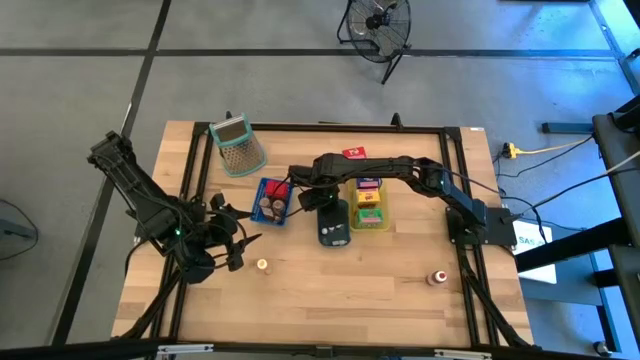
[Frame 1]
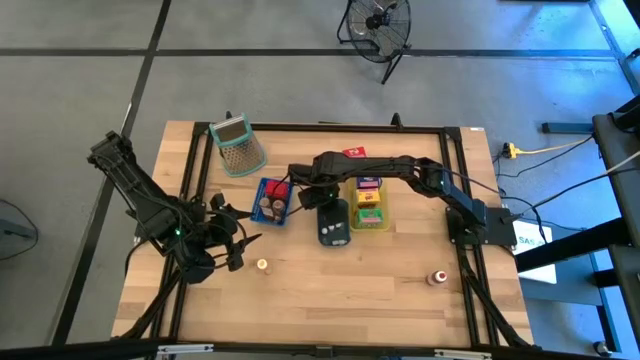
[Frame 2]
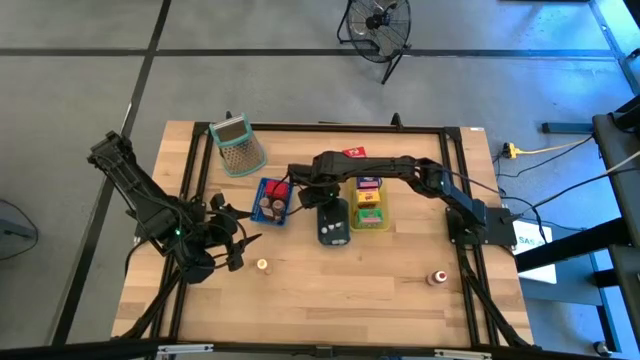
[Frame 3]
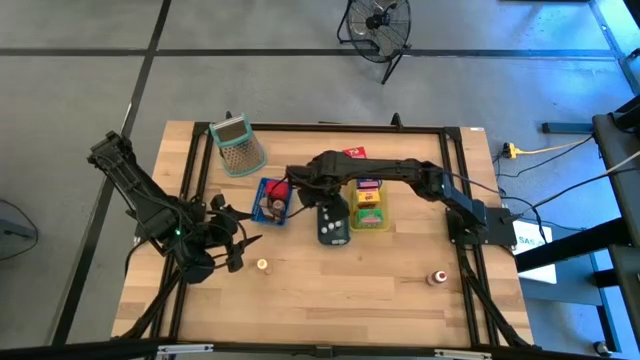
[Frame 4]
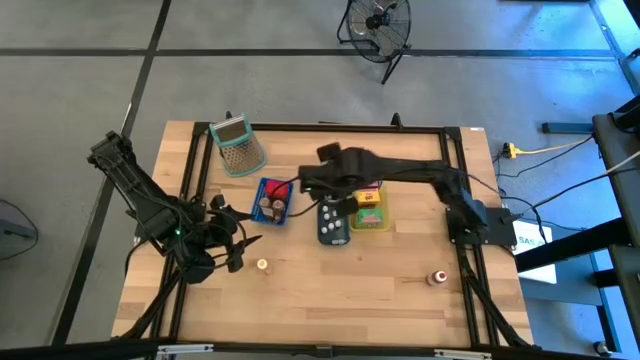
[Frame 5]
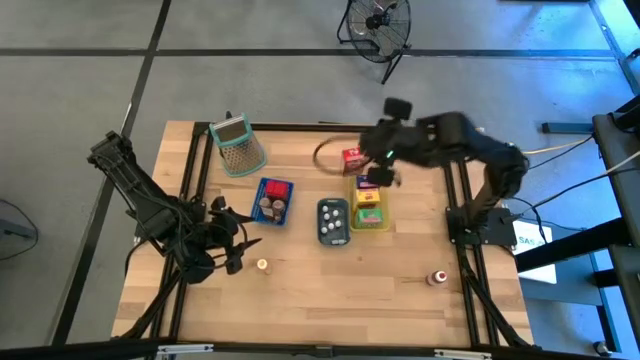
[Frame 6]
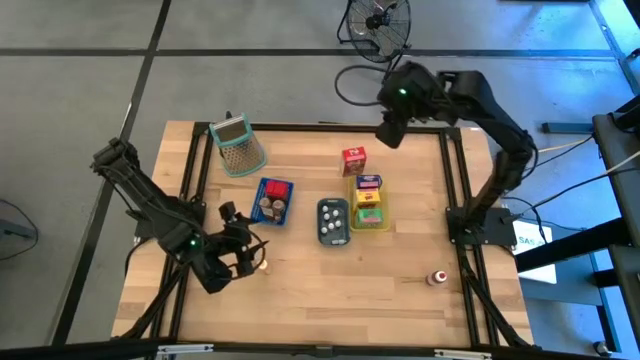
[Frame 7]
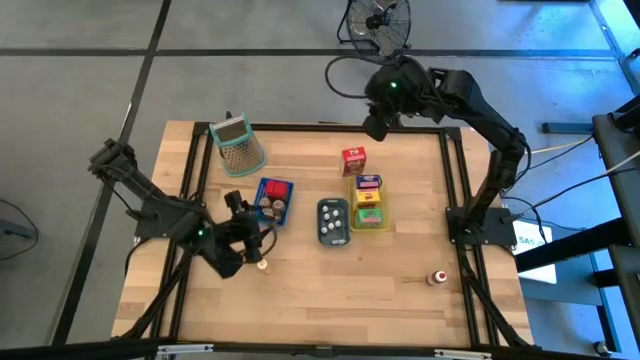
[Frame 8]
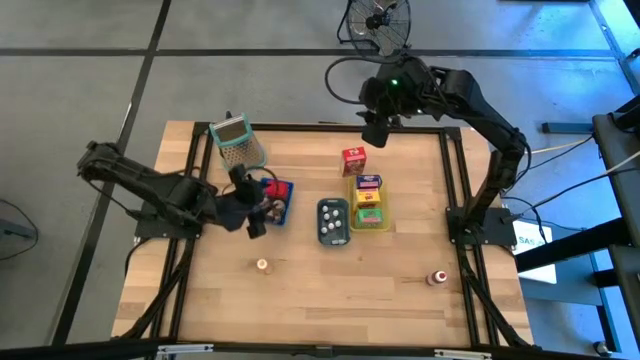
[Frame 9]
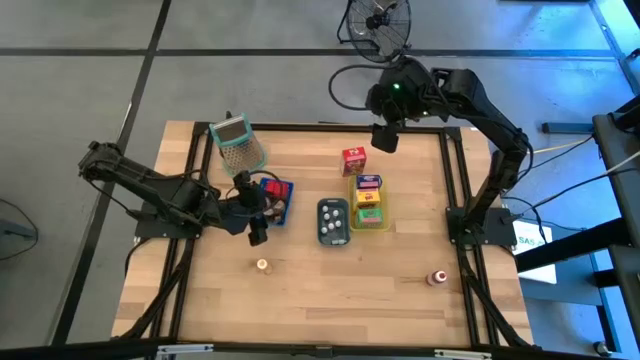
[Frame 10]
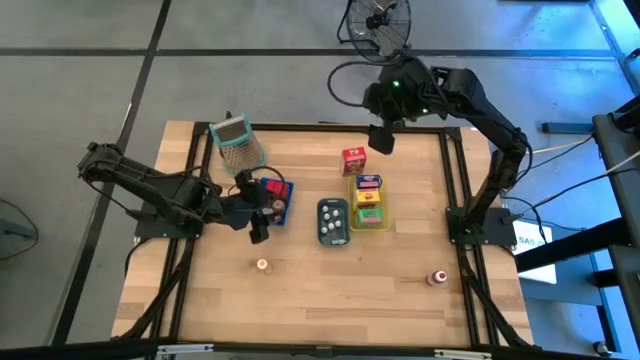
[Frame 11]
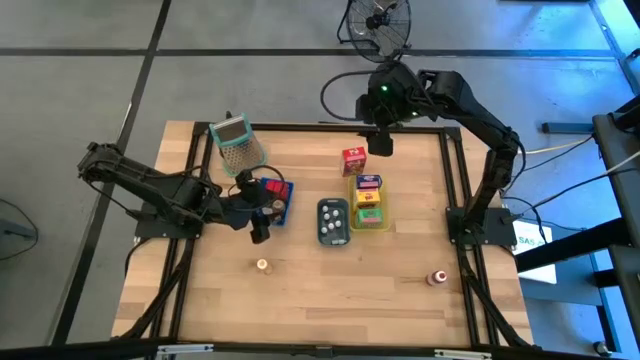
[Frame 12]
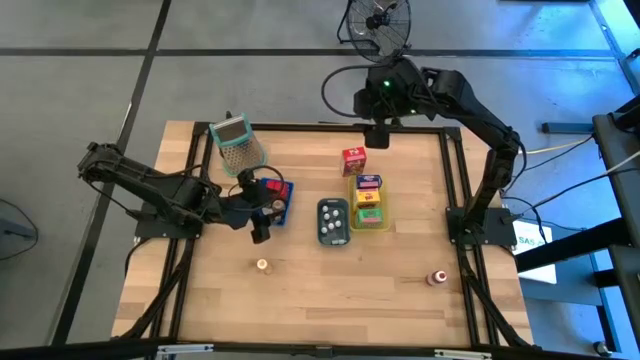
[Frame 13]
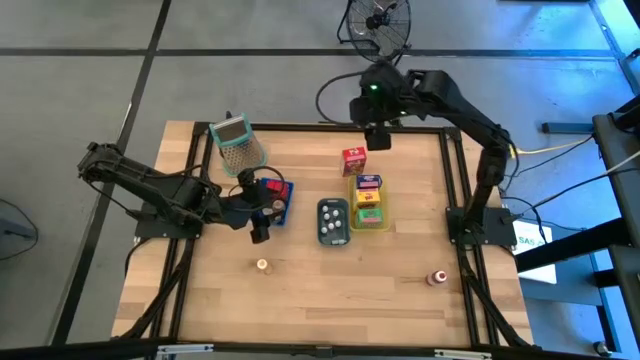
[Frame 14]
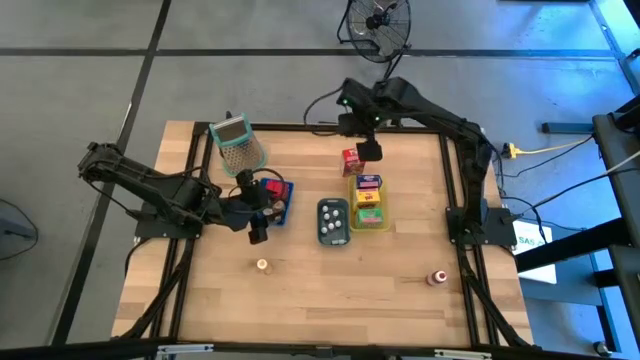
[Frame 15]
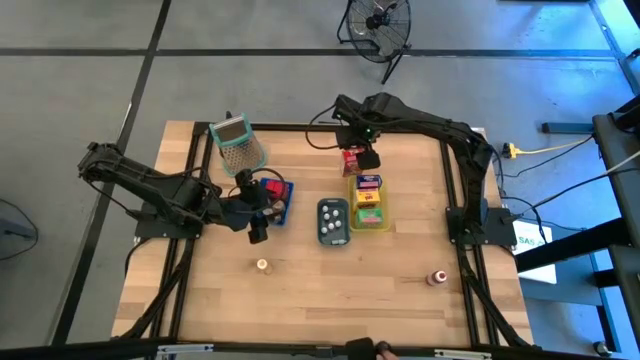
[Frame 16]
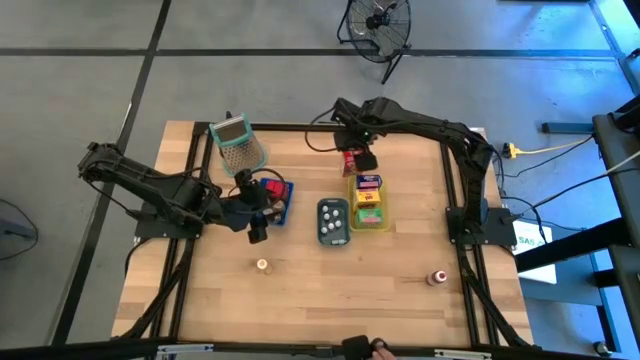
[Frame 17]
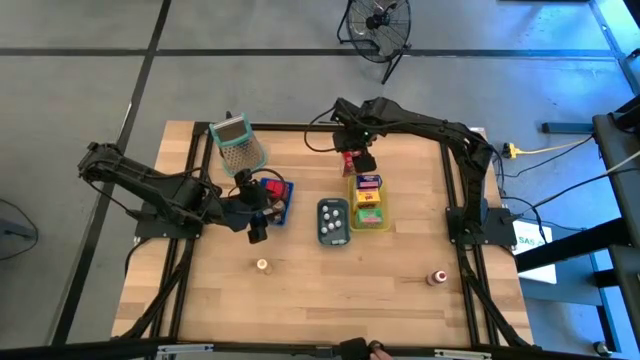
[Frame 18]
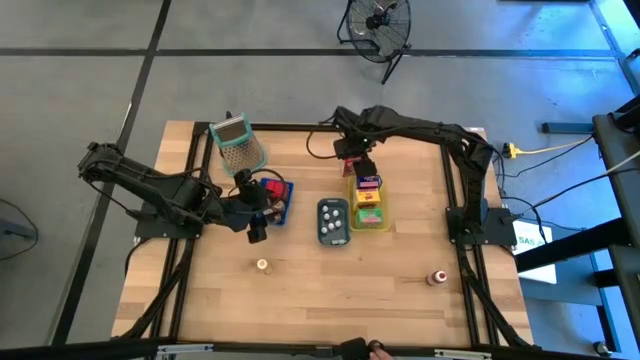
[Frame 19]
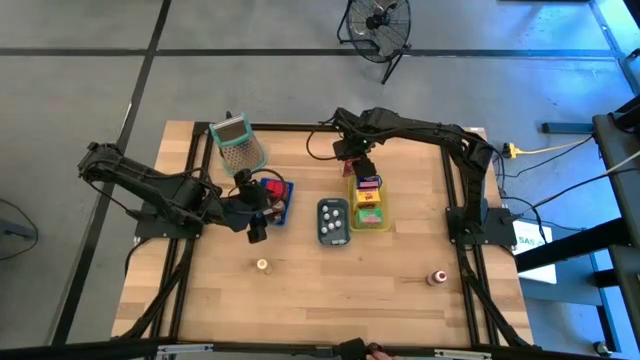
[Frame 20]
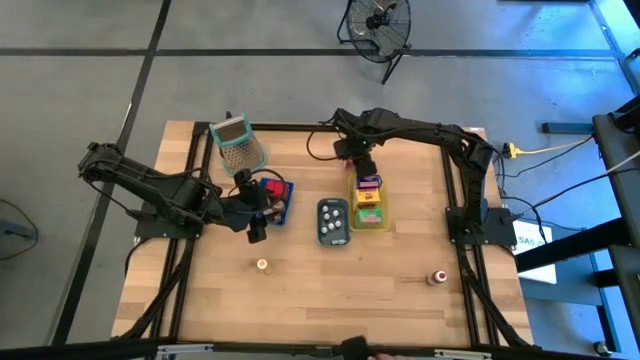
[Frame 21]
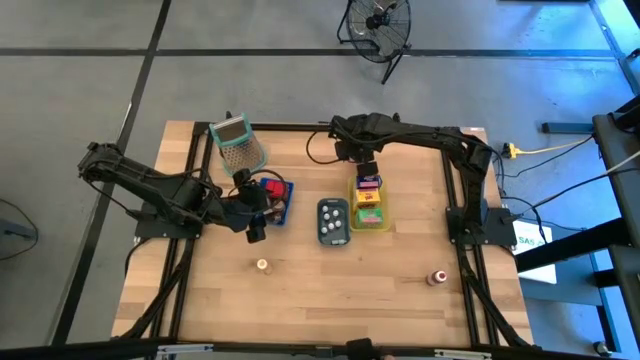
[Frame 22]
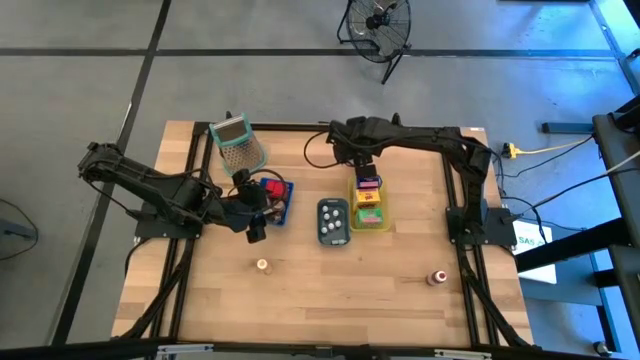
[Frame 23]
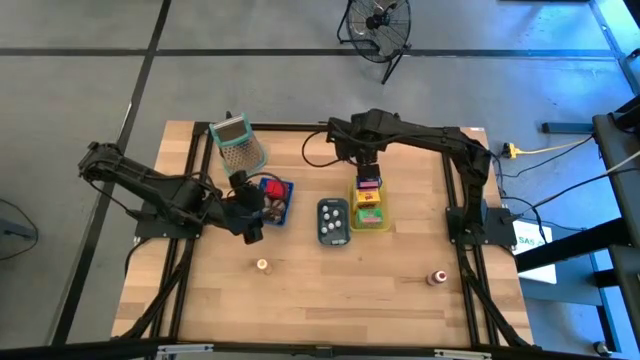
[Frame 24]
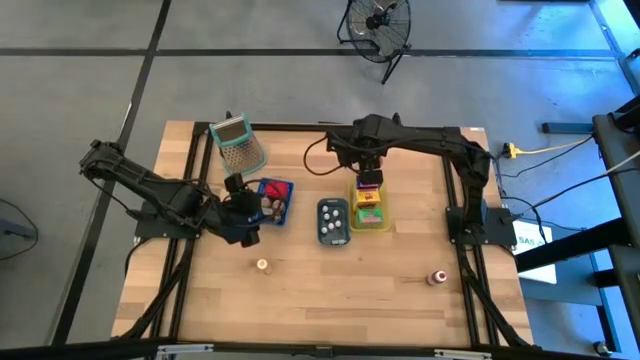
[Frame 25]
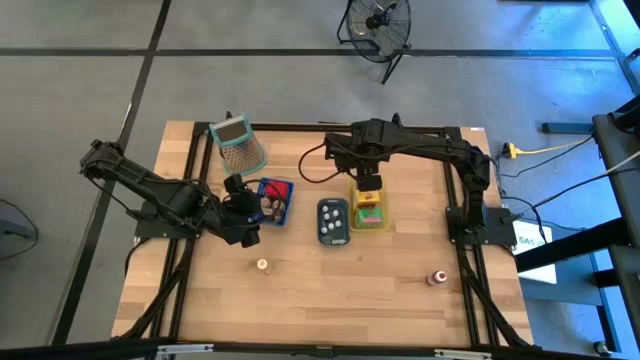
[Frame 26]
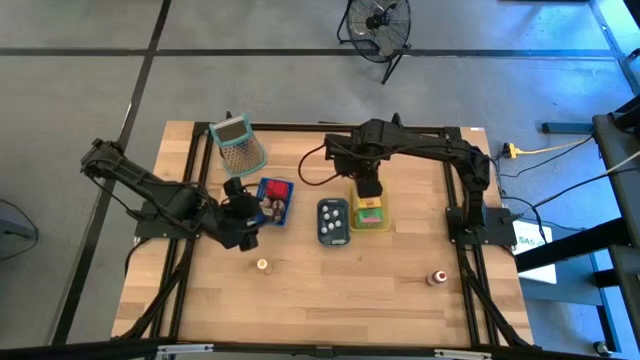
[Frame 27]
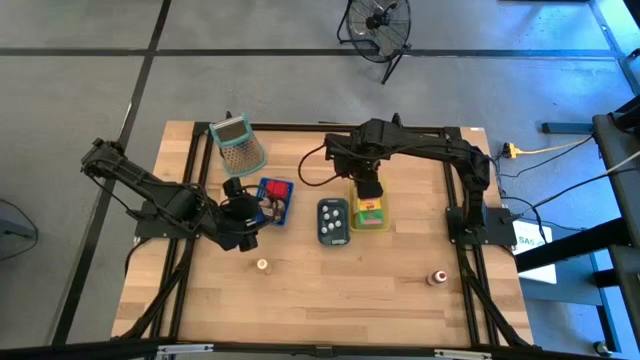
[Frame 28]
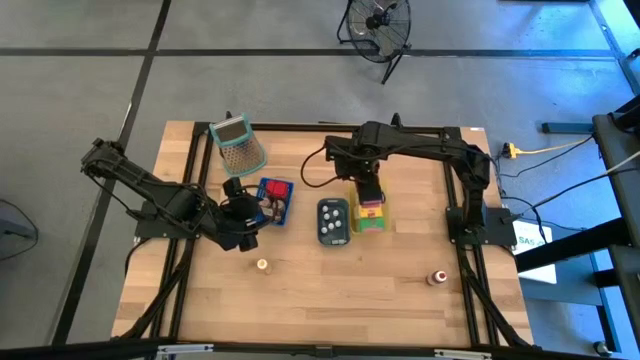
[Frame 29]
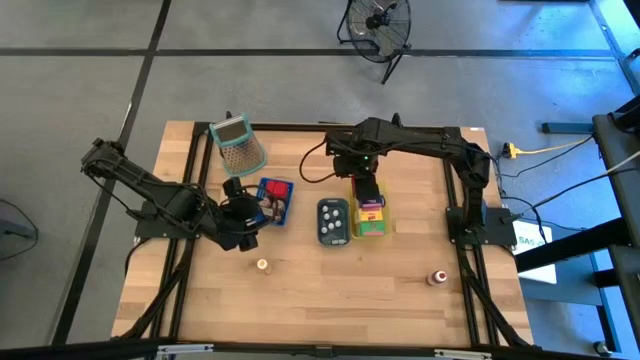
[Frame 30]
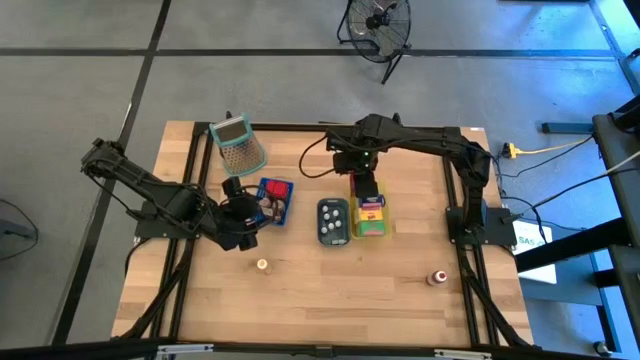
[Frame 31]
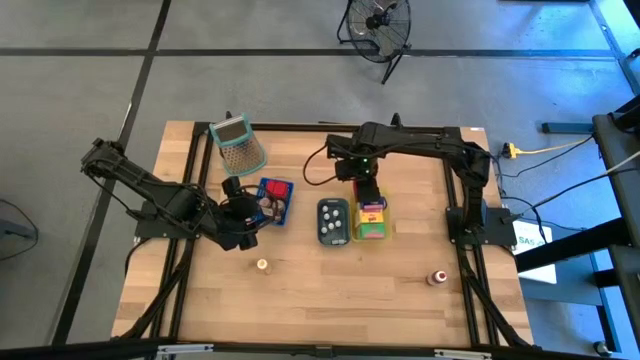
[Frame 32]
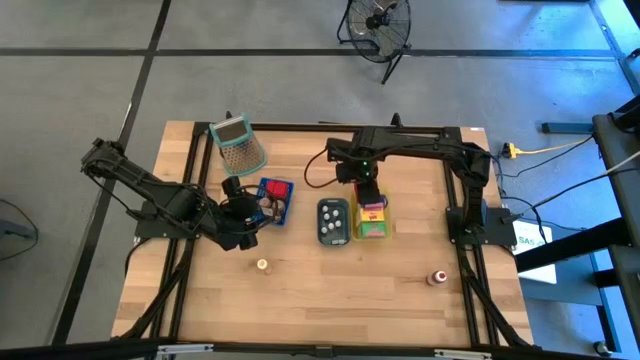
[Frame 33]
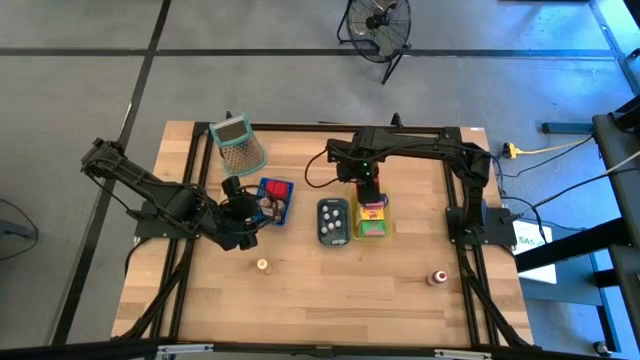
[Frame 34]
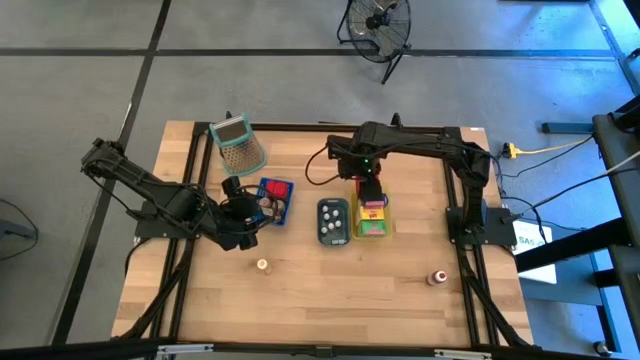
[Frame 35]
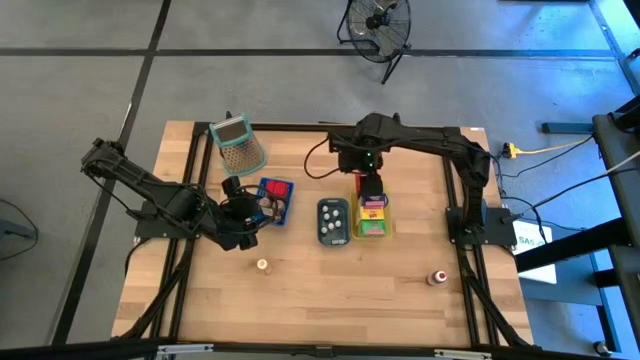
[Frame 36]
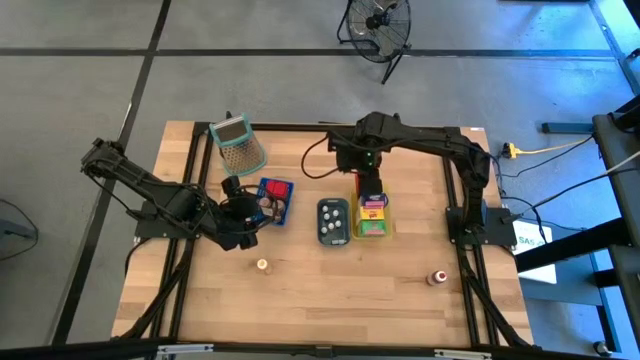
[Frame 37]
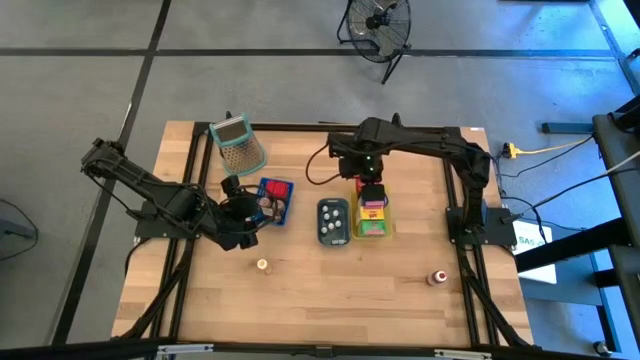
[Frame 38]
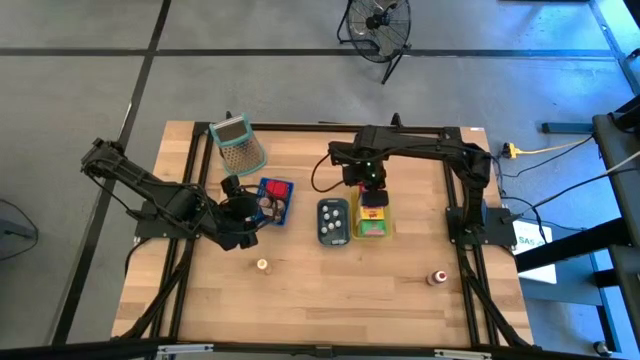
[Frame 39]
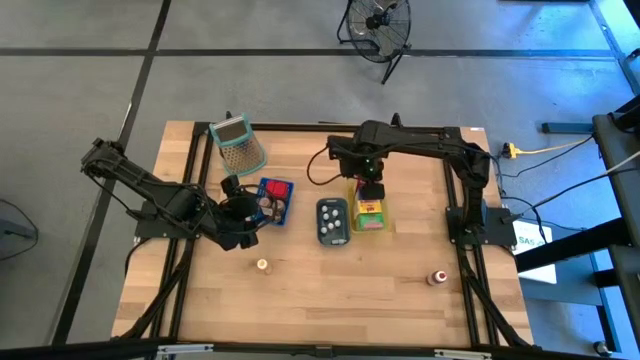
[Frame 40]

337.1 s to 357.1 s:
Task: Pick & Place Kitchen Items
Put the red cereal box into the yellow bin

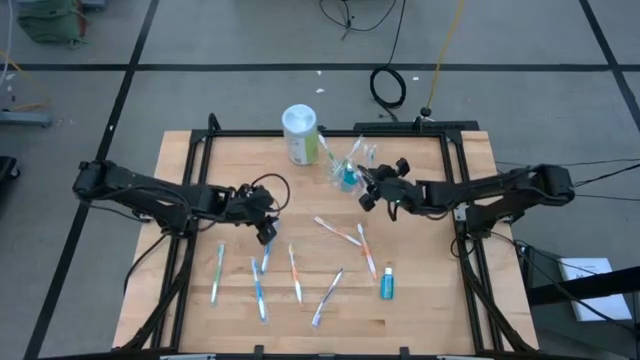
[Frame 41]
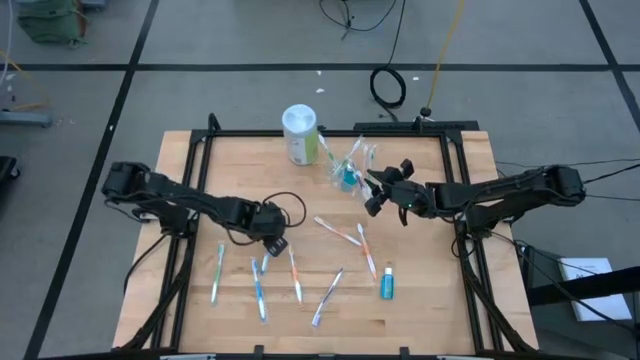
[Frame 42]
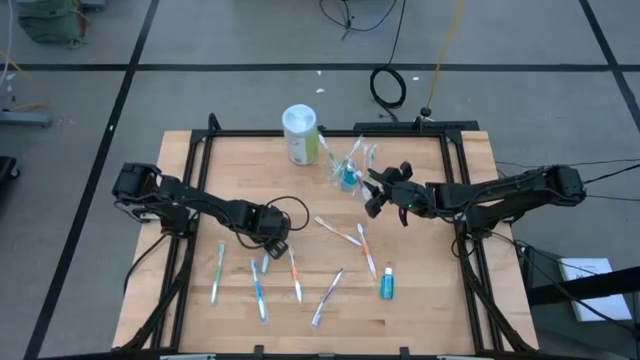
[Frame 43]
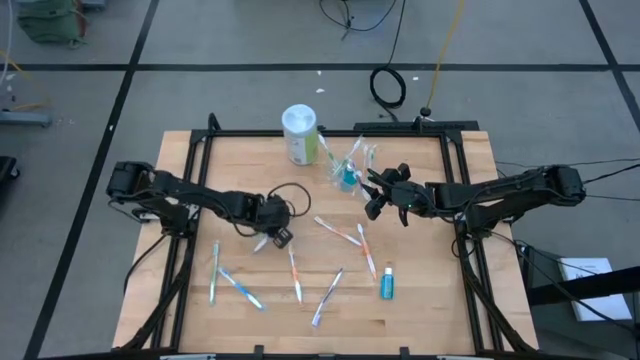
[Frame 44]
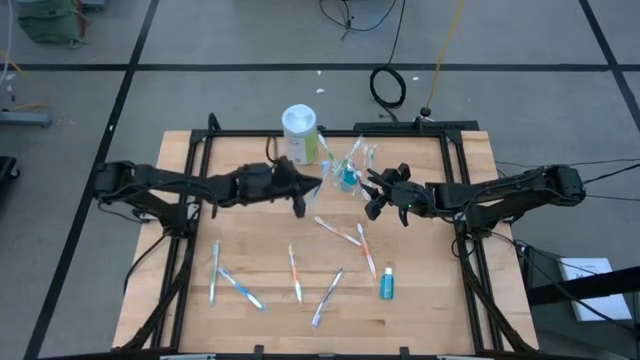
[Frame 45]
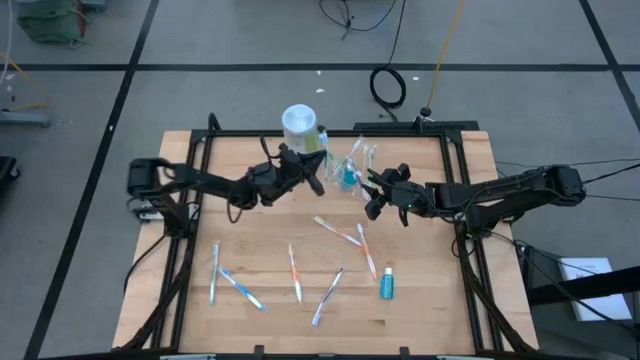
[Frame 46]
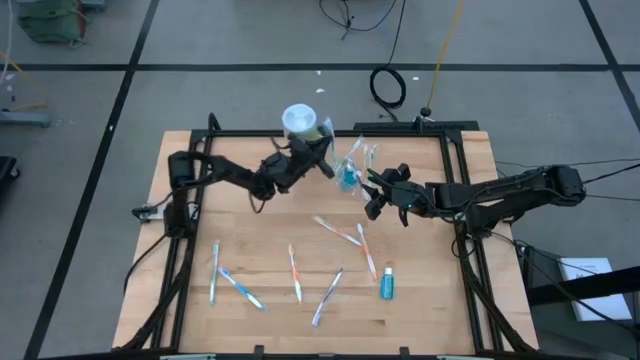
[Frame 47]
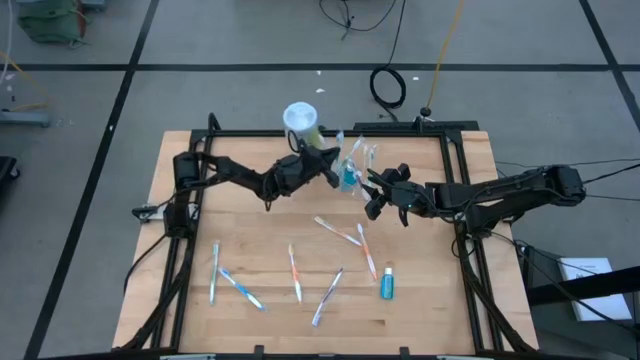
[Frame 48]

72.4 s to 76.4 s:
Task: Pick & Place toothbrushing station
Put the blue toothbrush into the transparent organizer
